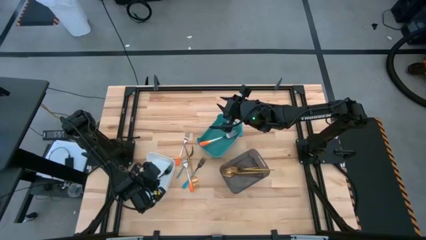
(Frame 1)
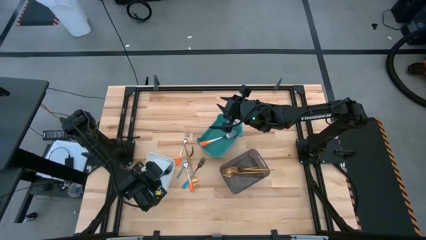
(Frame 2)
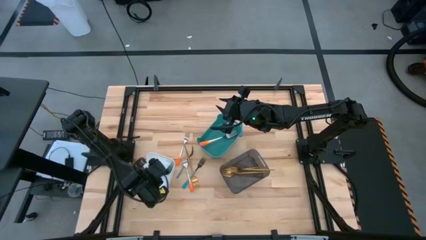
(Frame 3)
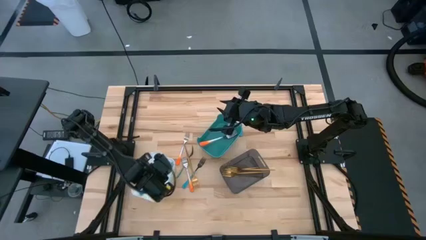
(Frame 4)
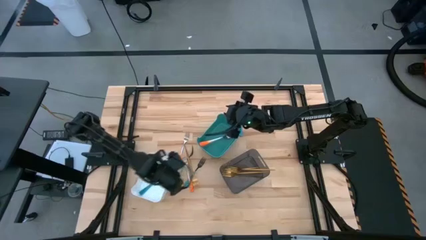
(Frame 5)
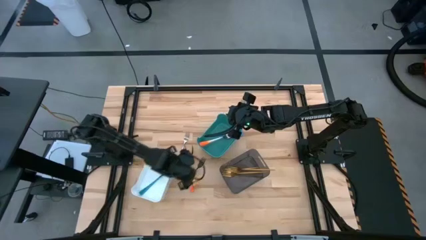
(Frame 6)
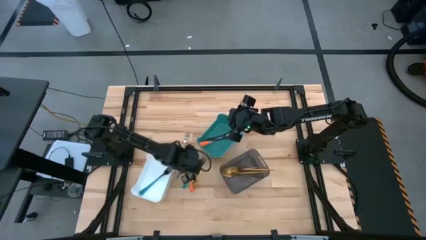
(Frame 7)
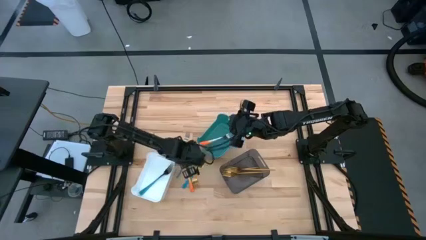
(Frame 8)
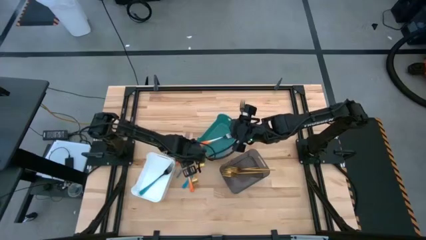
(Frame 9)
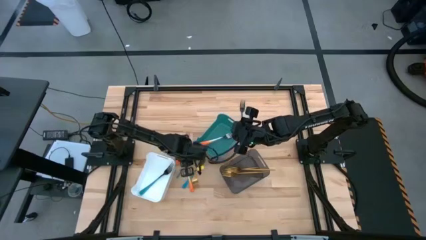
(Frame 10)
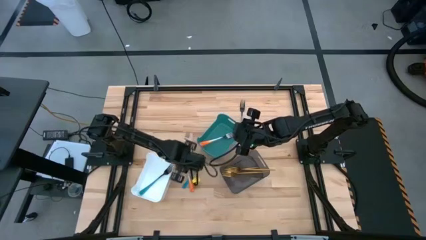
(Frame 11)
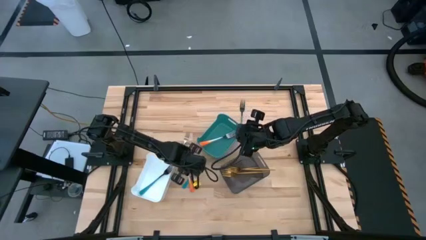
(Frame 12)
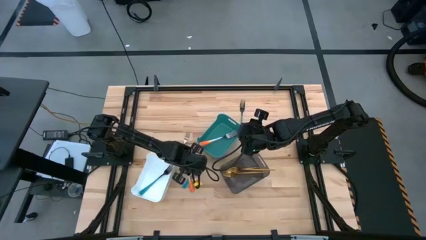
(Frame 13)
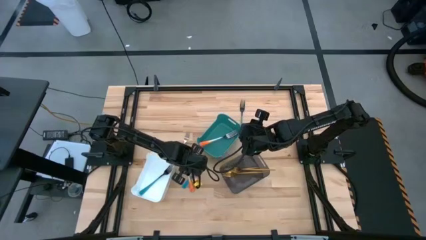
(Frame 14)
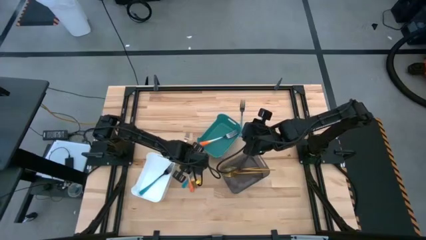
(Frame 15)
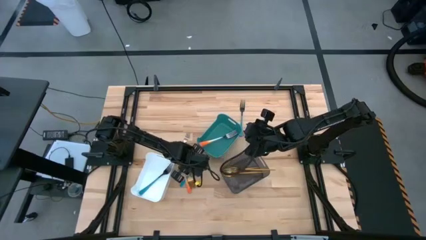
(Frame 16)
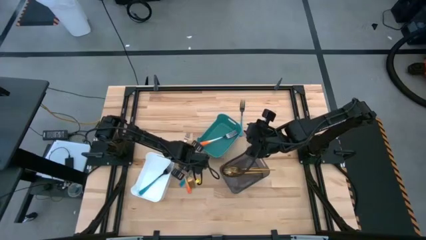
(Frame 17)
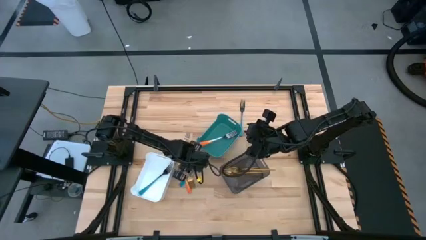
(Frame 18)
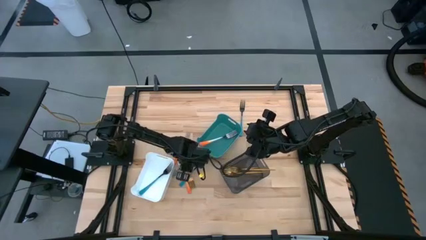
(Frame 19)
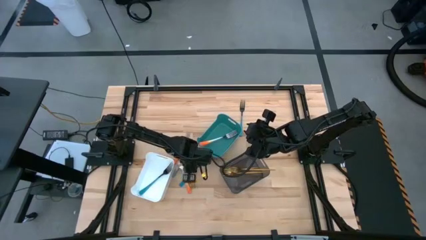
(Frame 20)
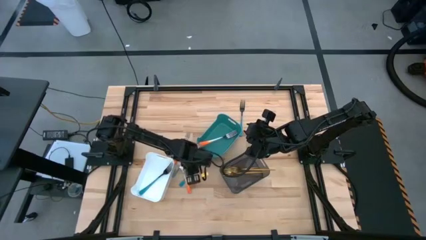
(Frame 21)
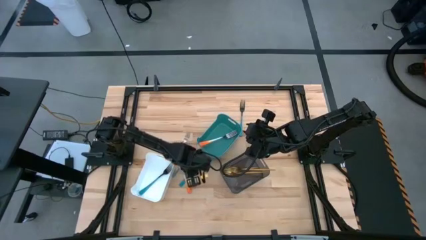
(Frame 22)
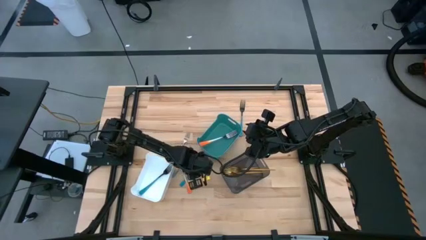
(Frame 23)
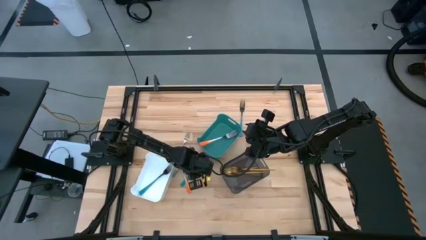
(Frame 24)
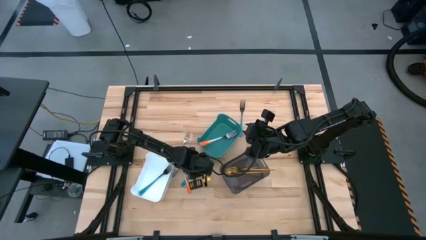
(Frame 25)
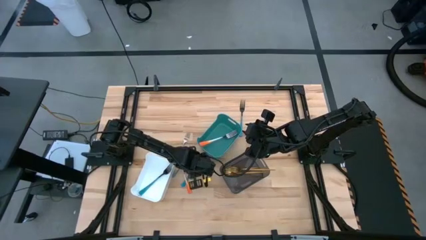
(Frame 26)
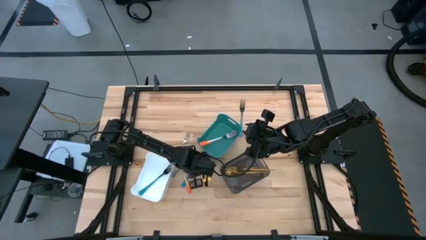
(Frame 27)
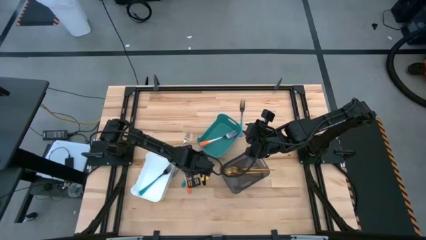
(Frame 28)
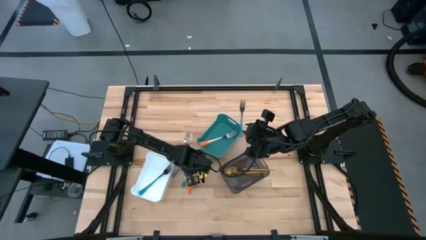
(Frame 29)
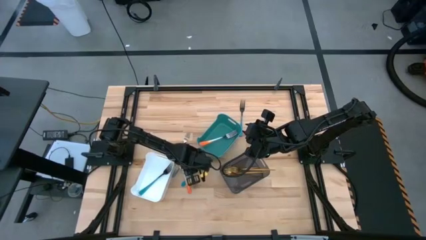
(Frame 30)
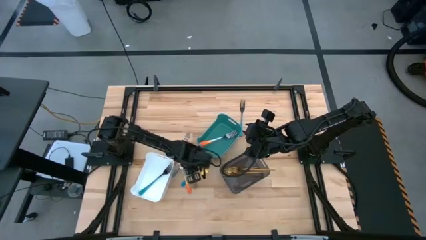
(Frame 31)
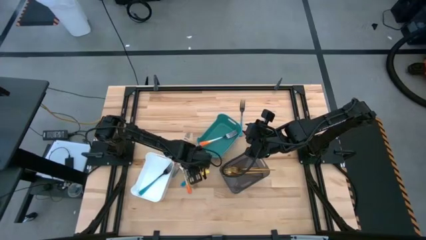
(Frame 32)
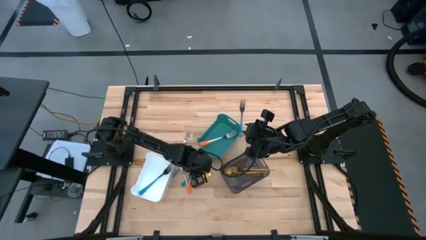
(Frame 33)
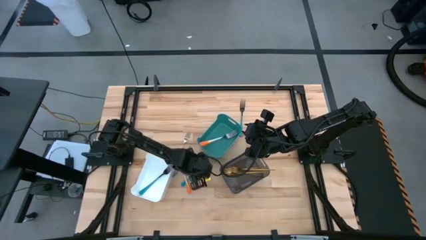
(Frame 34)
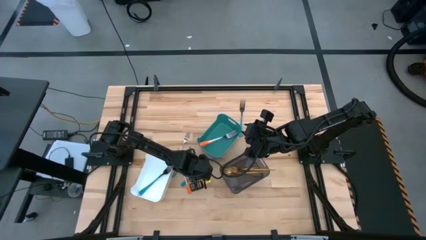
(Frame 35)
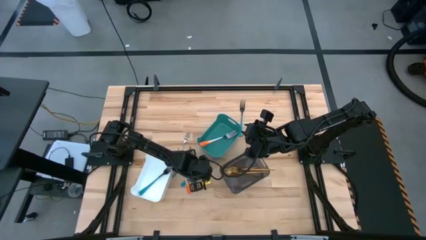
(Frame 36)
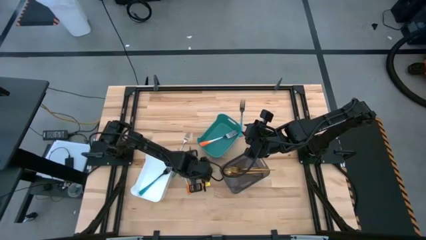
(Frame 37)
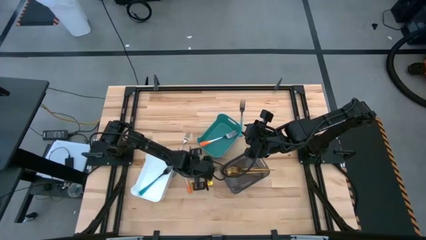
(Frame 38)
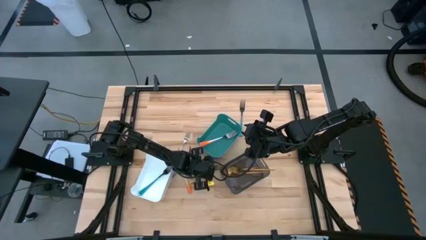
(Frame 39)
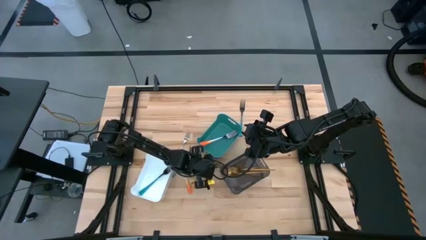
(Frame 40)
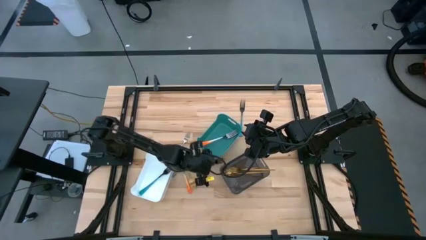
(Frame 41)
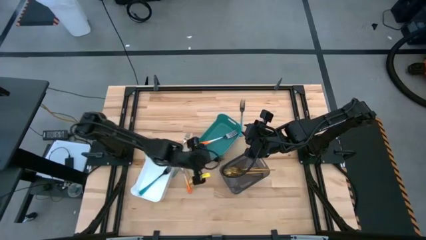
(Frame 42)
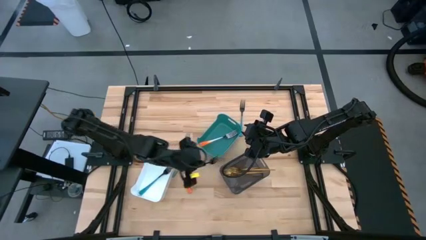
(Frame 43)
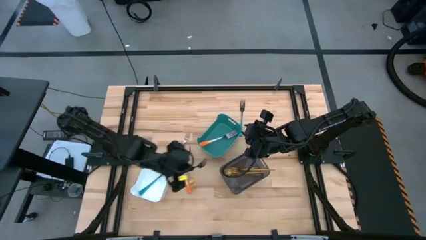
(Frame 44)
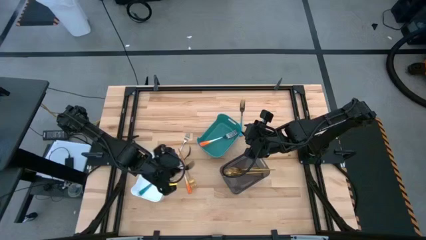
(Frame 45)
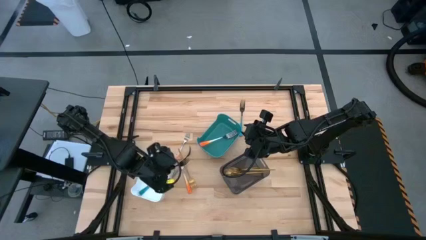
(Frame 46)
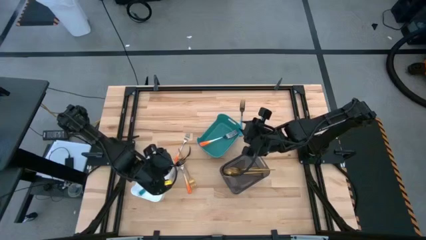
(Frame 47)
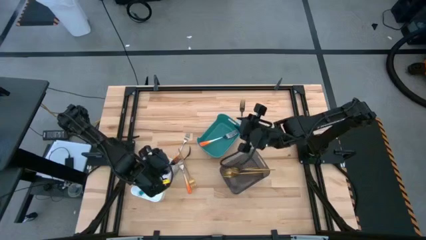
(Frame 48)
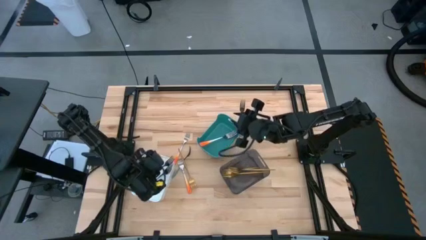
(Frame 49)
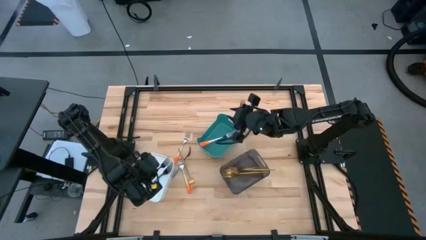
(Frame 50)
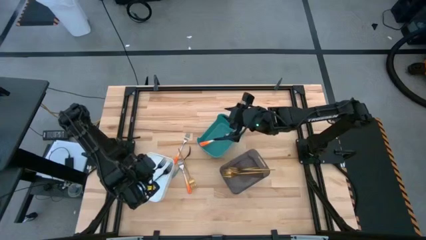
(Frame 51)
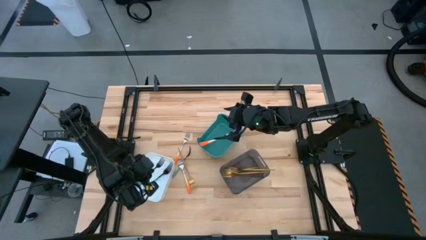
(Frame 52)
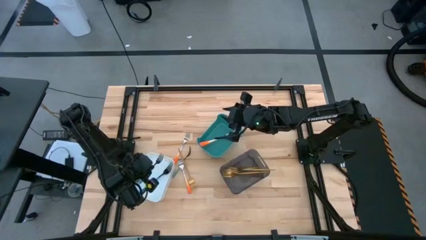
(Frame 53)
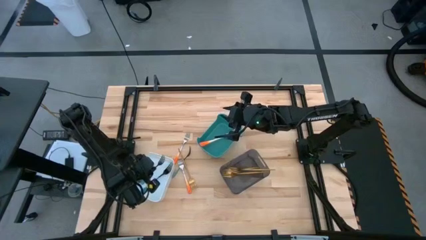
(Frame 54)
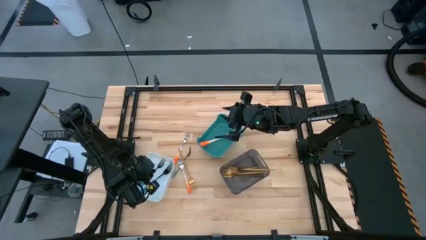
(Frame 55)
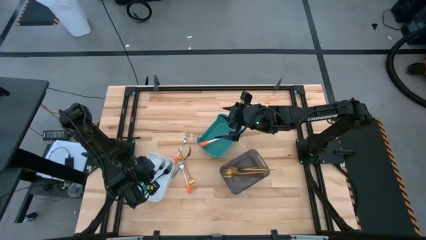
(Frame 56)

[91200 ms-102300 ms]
Task: Sort silverware by color (type)
Put the blue silver fork into the white bin

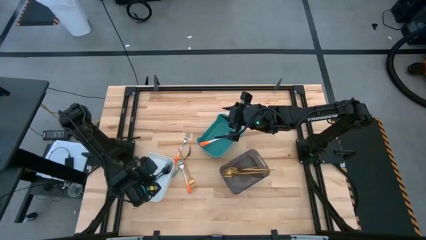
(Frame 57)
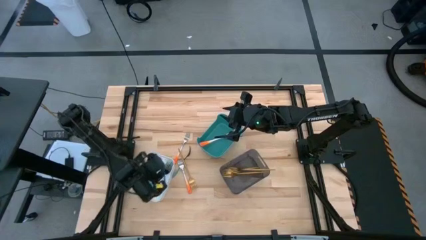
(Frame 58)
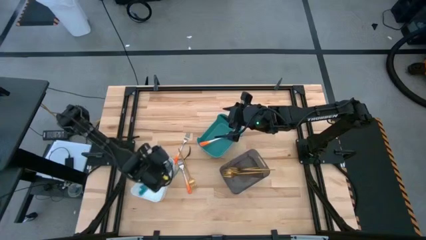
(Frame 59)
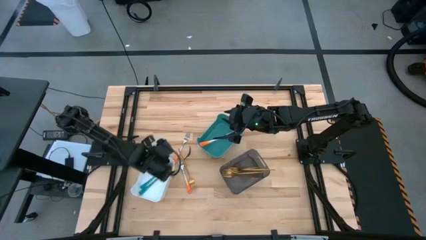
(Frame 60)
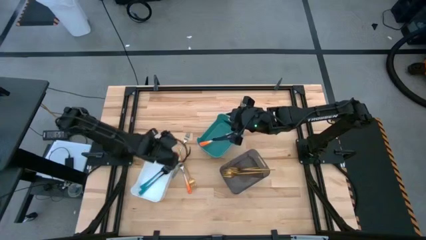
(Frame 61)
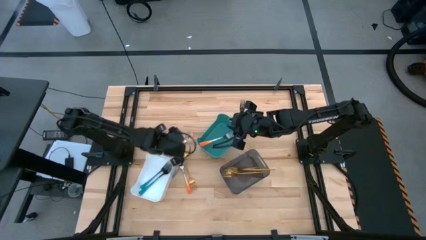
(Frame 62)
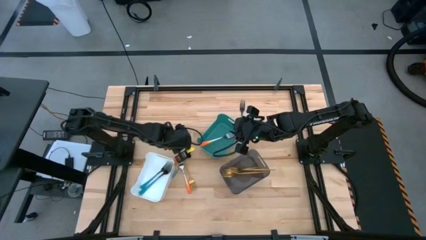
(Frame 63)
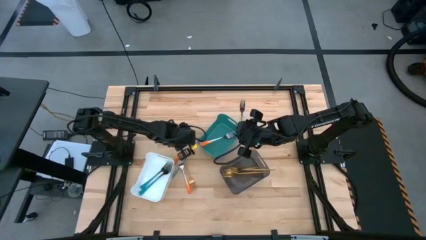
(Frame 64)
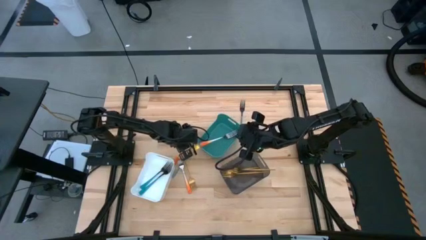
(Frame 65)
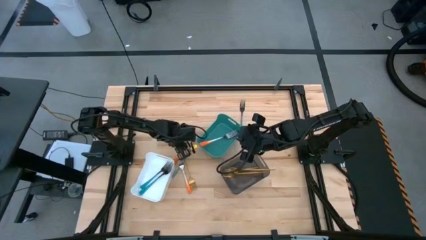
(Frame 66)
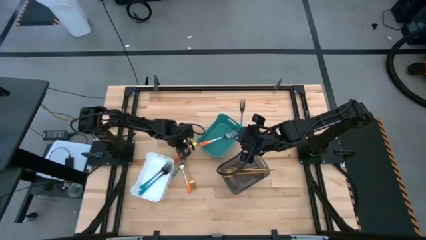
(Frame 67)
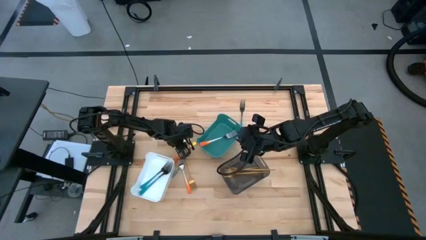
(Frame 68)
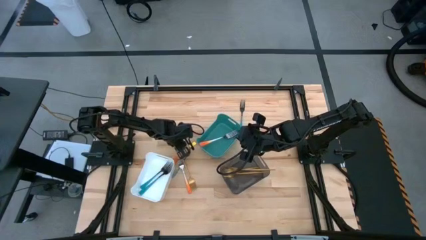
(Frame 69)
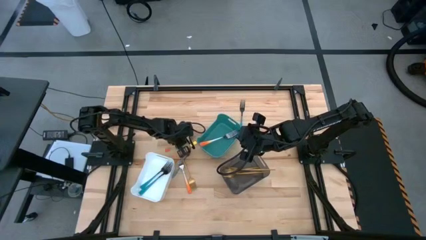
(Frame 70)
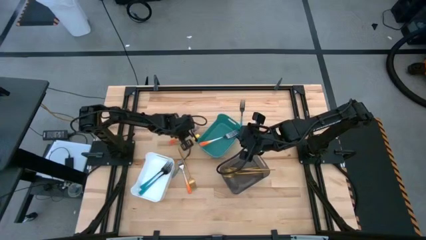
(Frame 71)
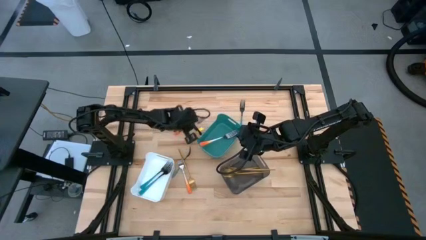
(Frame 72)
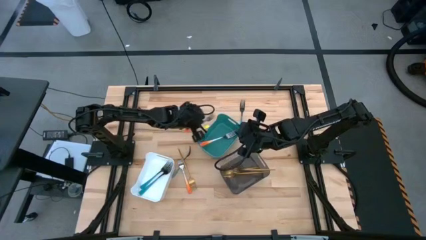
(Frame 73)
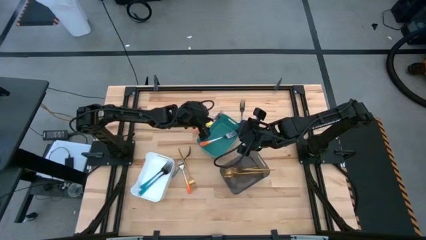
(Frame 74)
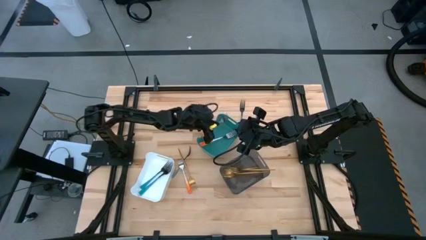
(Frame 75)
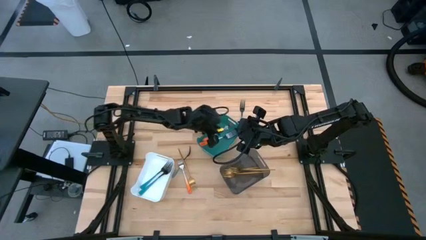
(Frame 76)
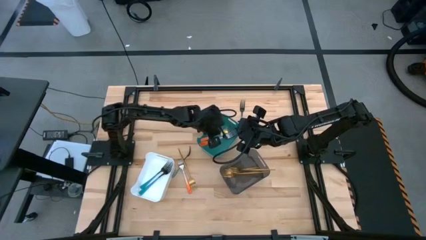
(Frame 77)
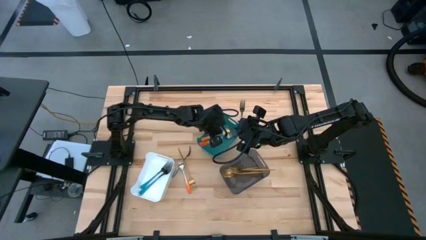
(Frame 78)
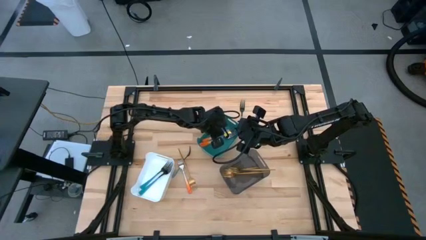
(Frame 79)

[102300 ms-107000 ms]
Put the orange silver fork into the blue bin
